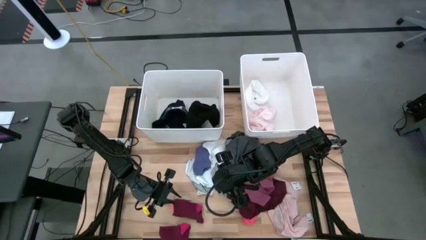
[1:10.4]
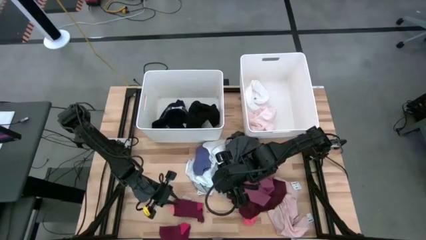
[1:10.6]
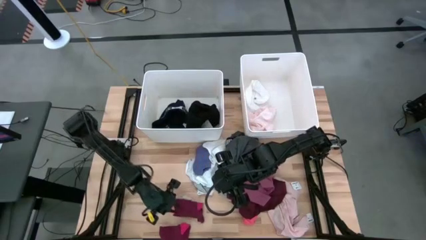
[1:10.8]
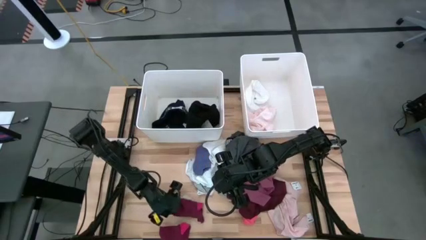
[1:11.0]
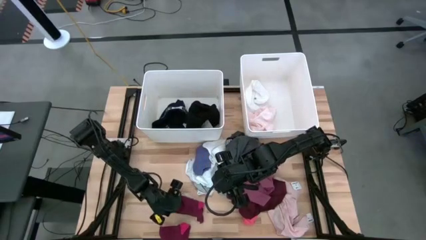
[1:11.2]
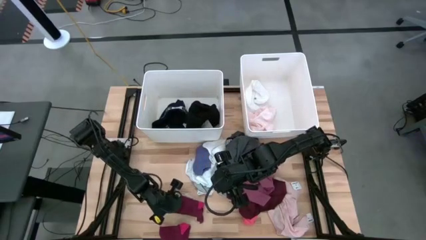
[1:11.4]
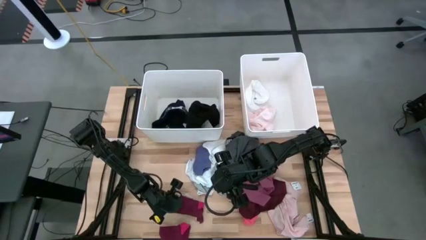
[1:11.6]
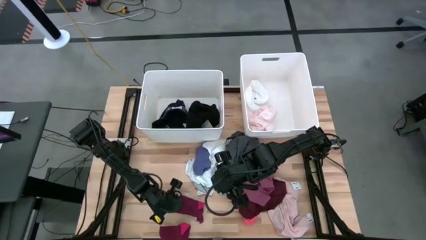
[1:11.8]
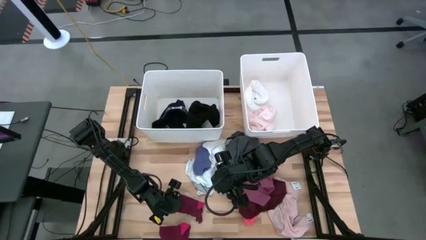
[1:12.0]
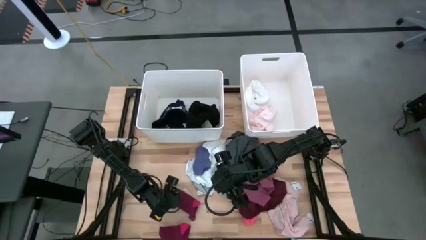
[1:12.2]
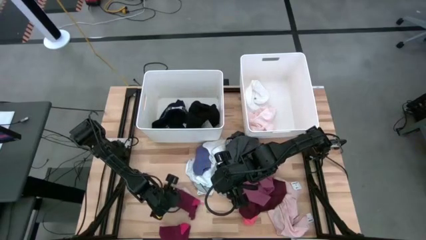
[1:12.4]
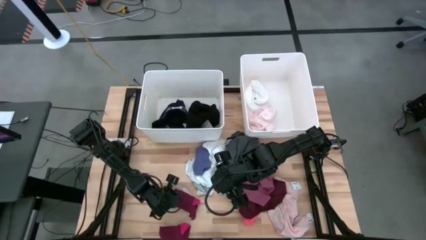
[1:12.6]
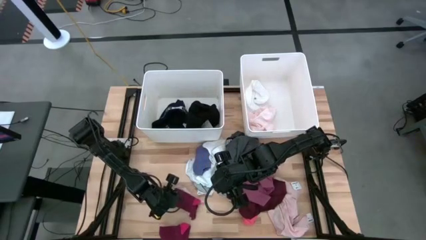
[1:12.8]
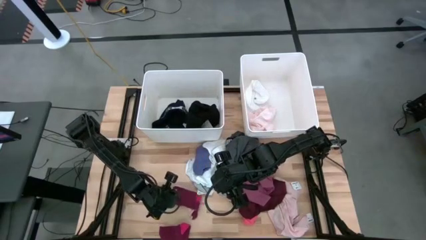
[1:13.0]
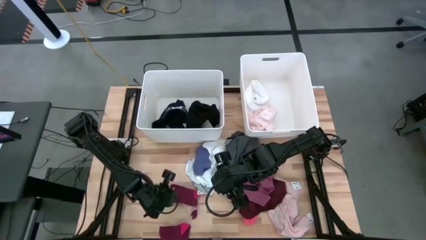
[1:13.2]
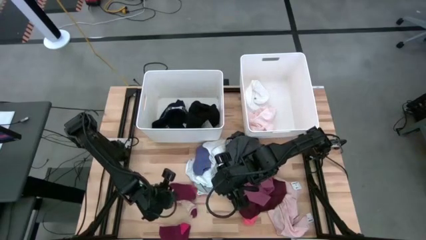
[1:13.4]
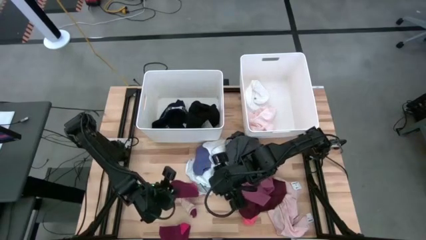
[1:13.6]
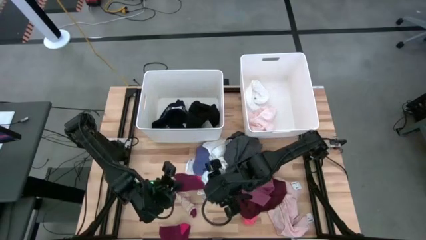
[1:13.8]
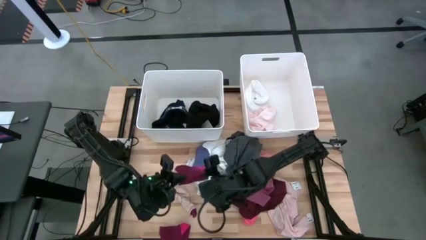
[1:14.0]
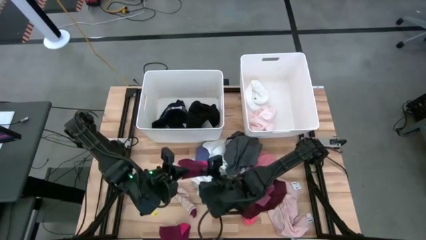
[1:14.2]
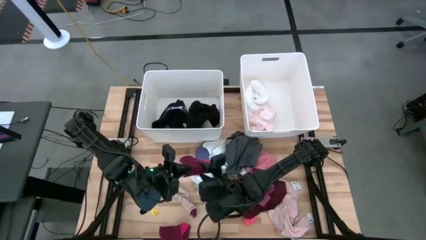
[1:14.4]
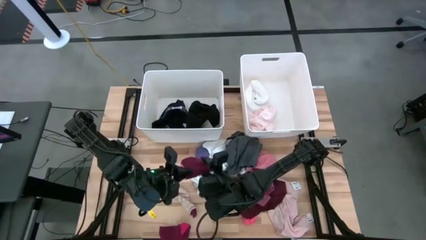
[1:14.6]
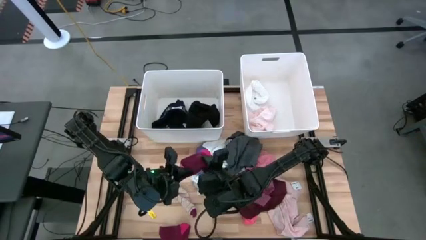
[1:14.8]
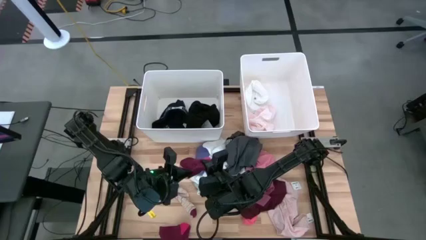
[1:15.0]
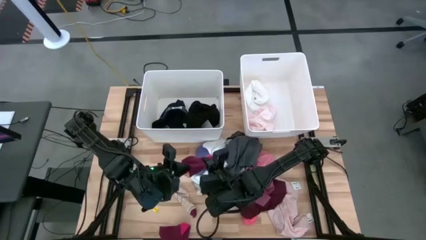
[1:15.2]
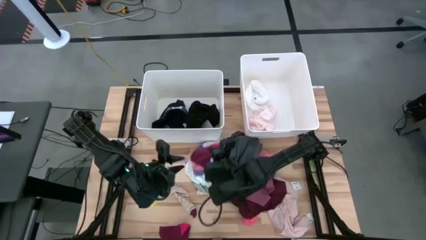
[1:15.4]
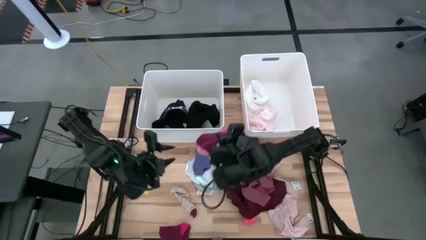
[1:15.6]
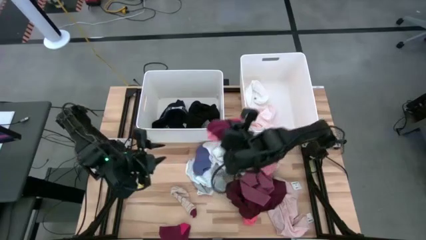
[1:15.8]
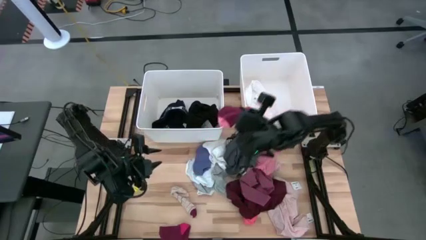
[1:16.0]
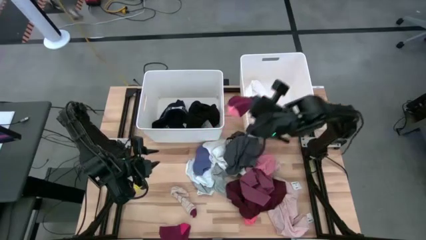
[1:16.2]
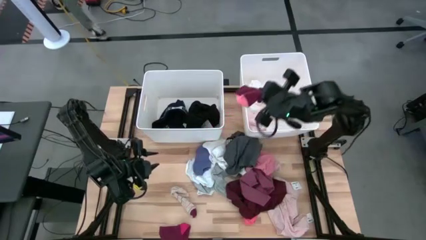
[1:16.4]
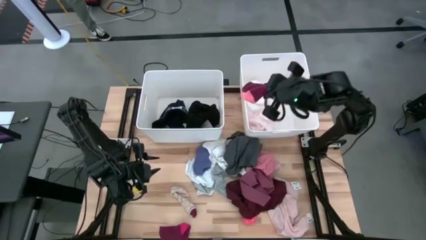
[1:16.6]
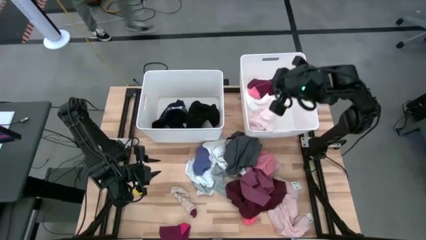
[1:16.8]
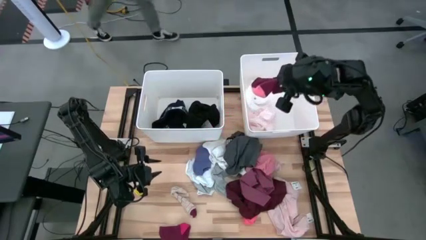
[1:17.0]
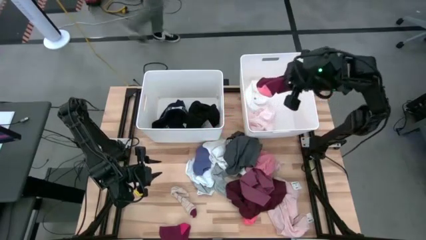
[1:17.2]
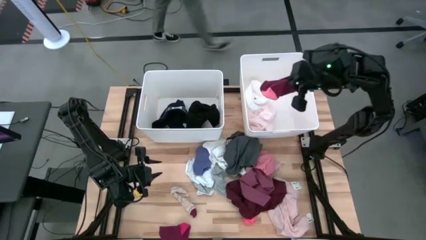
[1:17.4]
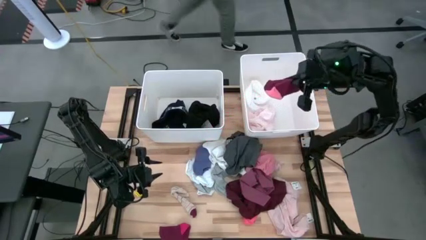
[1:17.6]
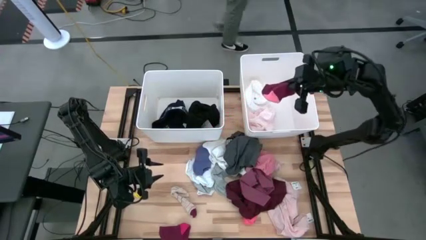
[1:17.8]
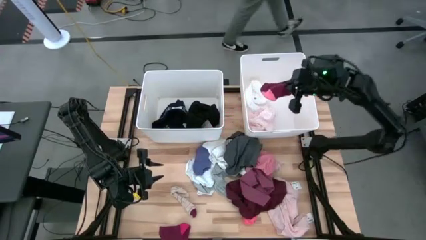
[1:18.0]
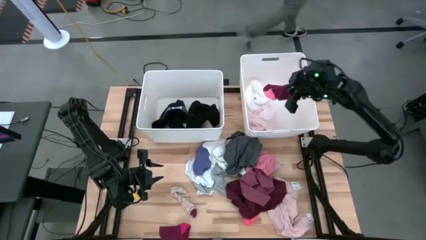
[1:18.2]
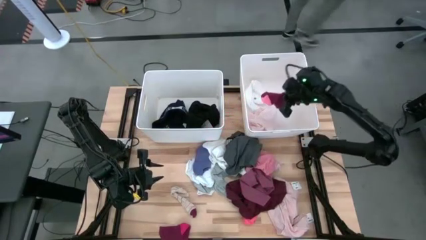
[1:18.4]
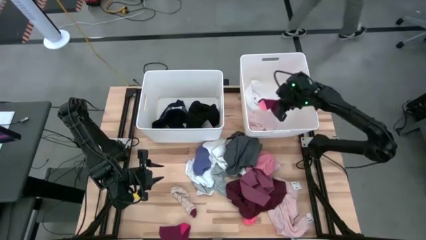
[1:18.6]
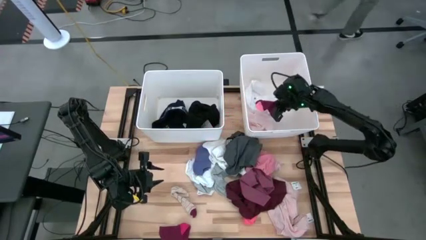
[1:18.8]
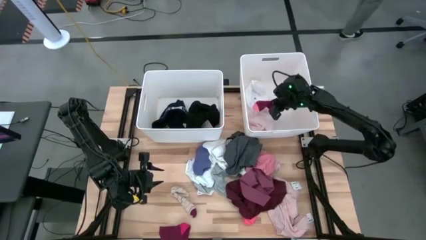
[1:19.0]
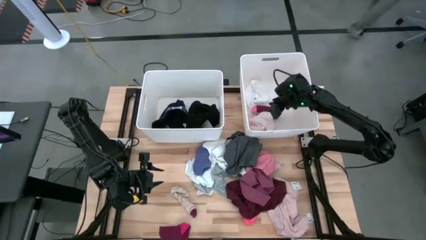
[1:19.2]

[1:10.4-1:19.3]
Task: Sort clothes
Put the red sock into the right white laundry organizer

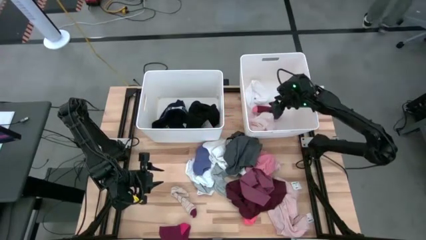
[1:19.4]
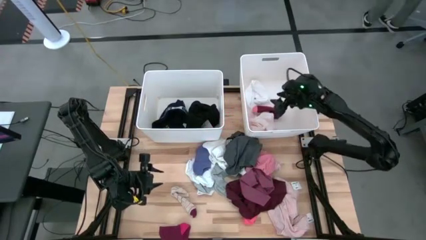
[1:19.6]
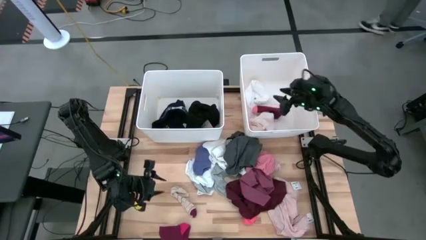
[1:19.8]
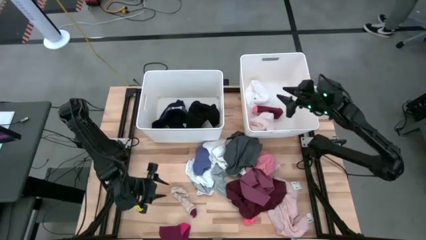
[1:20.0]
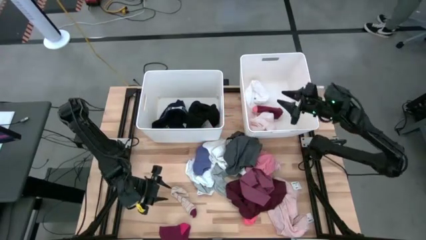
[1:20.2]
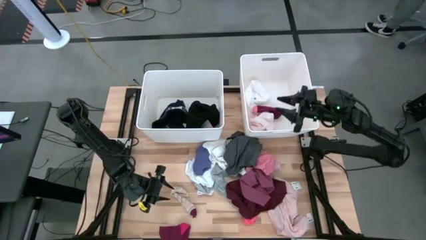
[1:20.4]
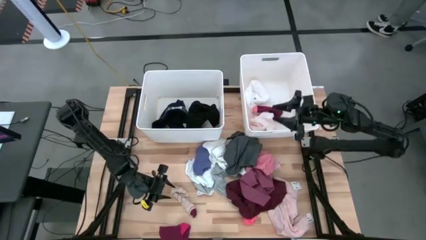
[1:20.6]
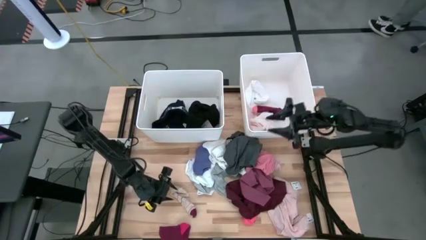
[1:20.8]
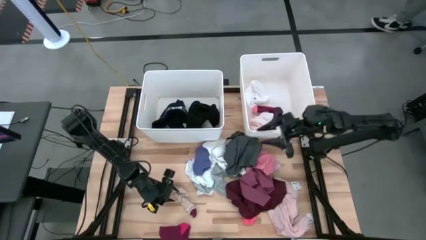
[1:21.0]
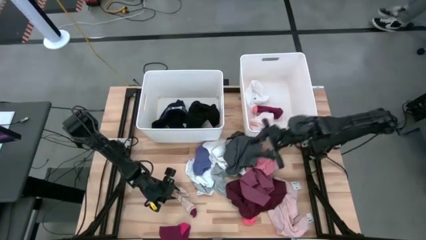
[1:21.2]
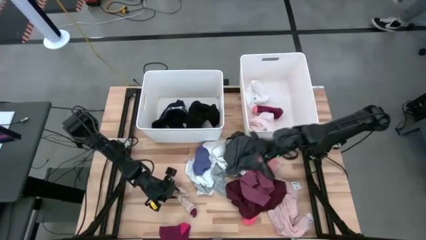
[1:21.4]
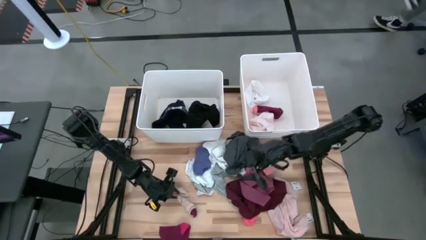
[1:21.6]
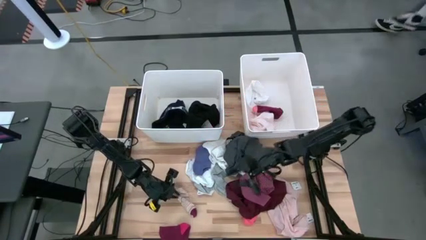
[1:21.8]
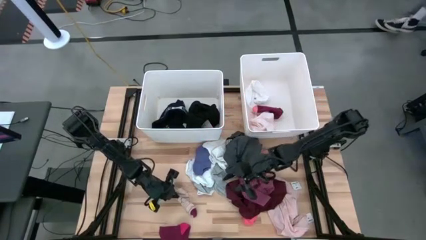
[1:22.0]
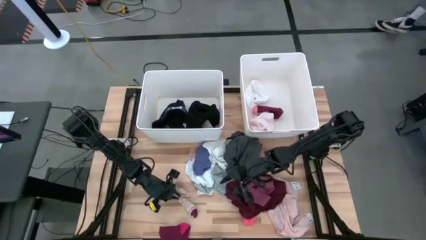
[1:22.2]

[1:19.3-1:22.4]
Put the light orange garment into the right white laundry organizer
